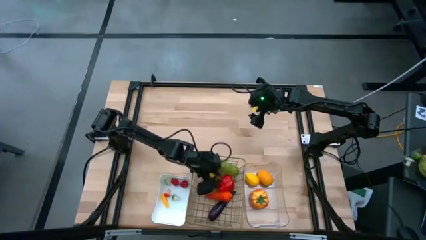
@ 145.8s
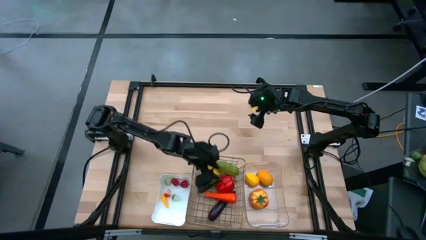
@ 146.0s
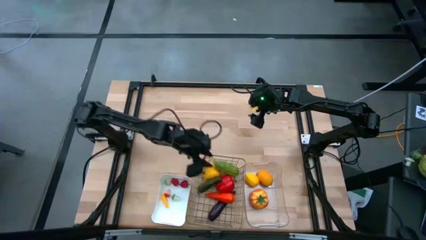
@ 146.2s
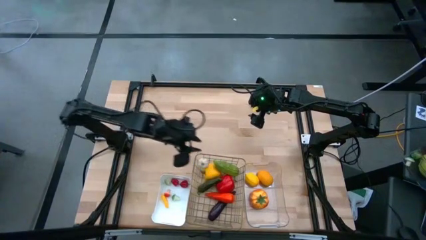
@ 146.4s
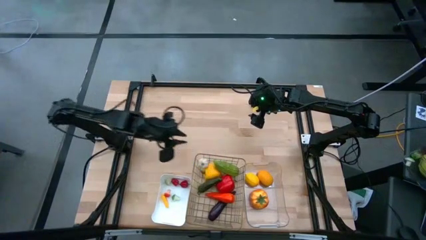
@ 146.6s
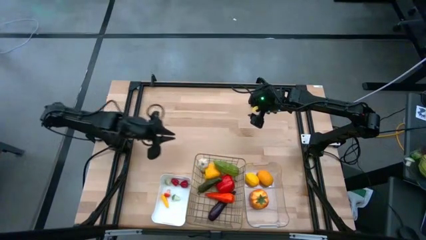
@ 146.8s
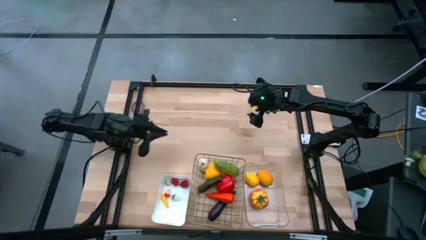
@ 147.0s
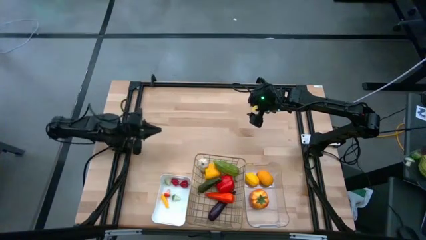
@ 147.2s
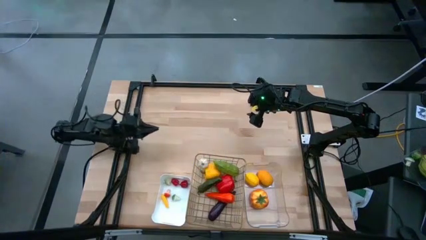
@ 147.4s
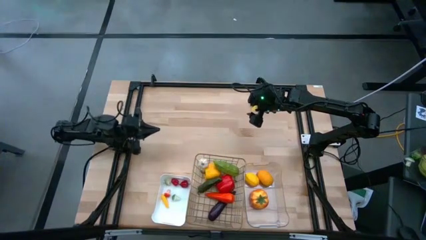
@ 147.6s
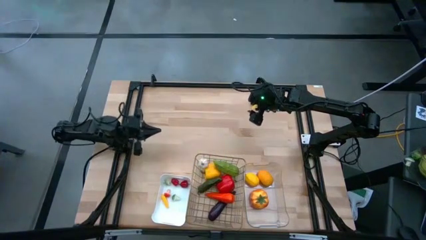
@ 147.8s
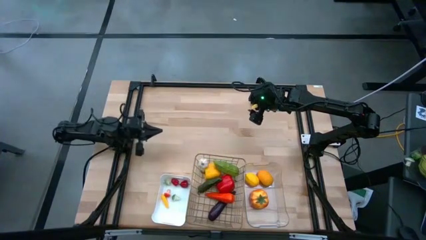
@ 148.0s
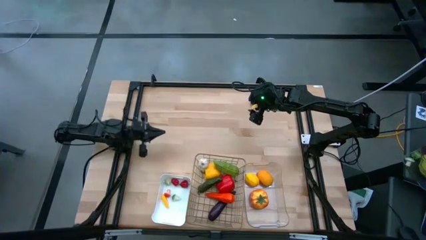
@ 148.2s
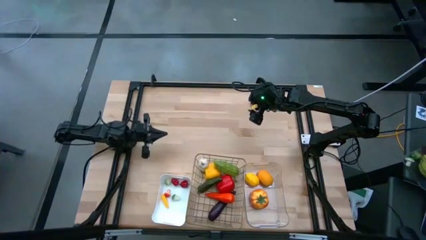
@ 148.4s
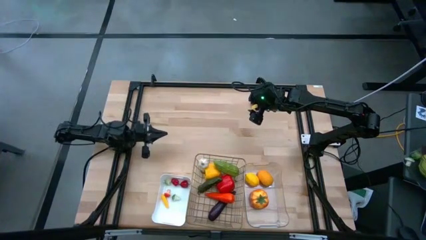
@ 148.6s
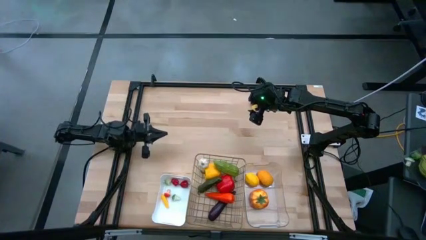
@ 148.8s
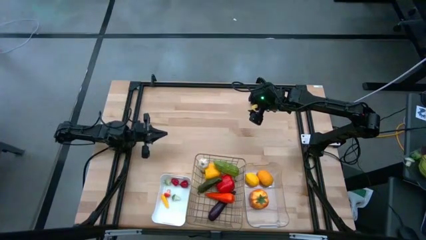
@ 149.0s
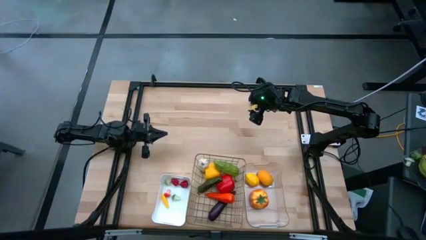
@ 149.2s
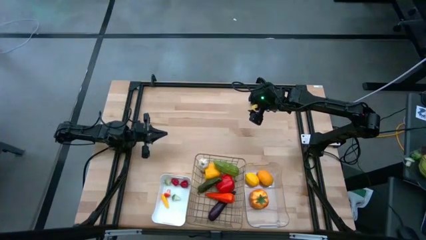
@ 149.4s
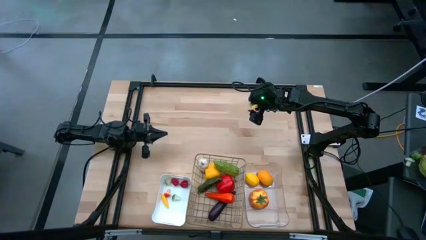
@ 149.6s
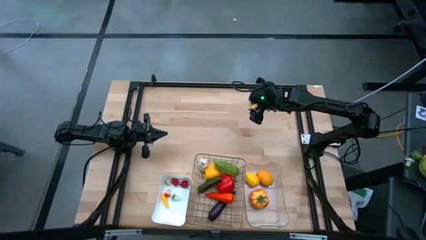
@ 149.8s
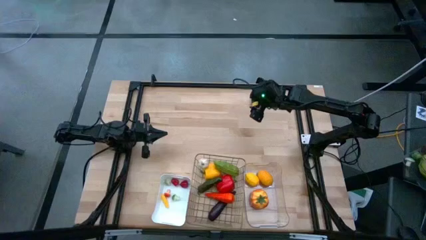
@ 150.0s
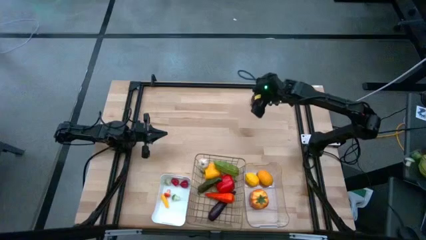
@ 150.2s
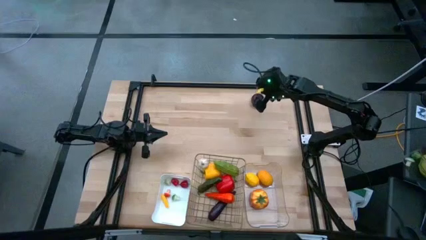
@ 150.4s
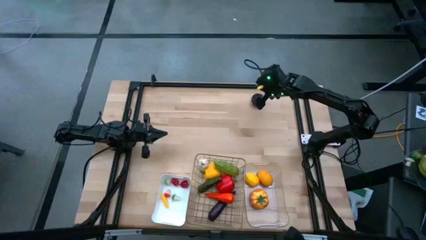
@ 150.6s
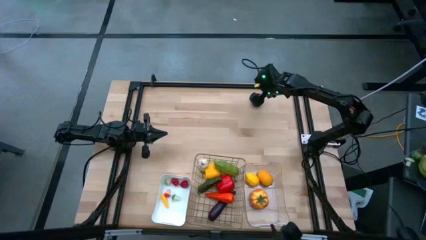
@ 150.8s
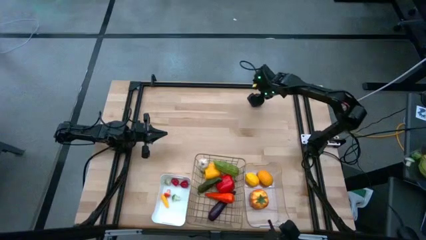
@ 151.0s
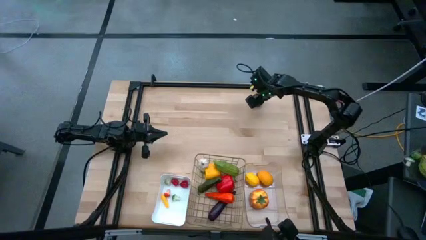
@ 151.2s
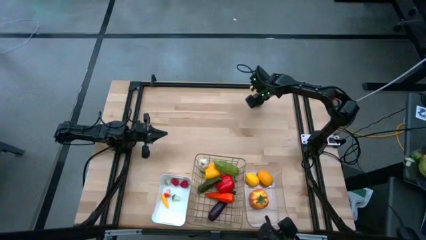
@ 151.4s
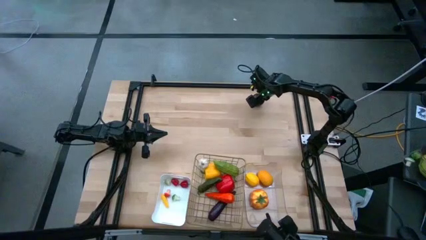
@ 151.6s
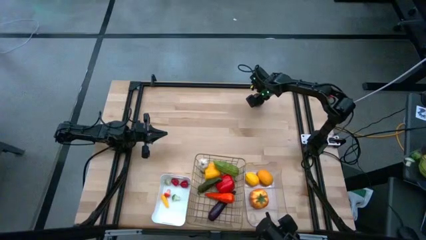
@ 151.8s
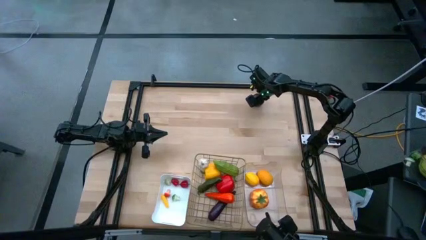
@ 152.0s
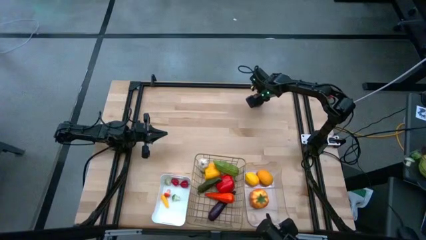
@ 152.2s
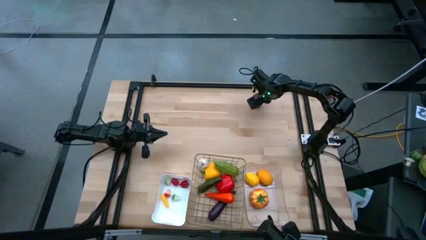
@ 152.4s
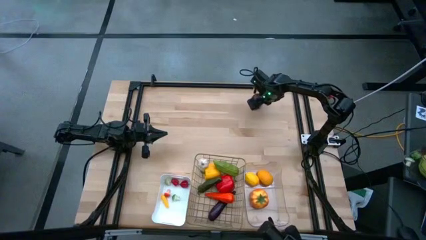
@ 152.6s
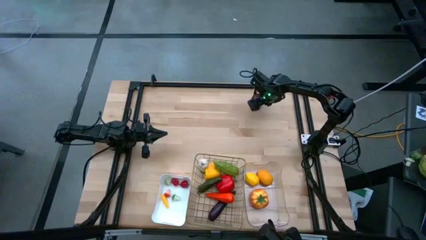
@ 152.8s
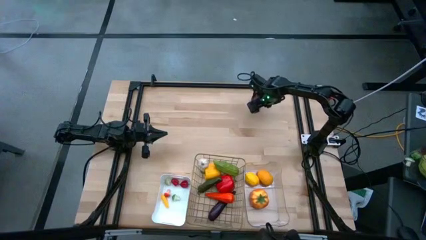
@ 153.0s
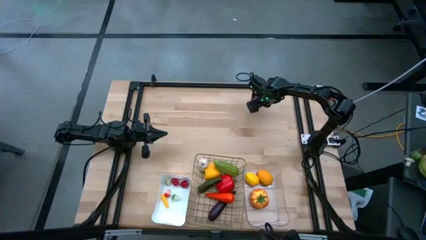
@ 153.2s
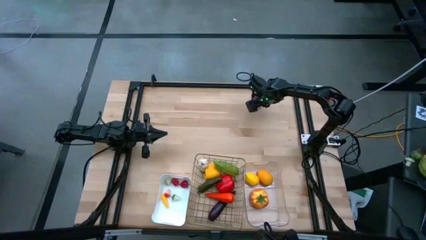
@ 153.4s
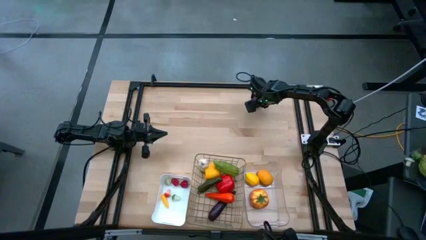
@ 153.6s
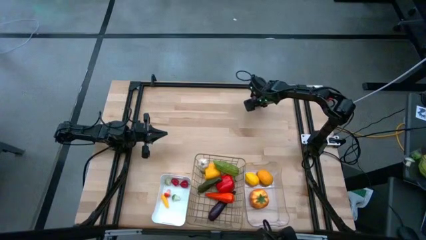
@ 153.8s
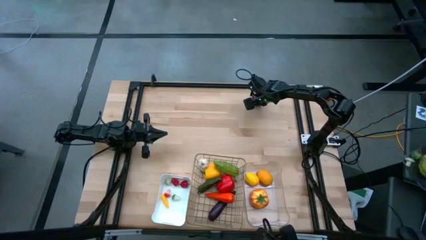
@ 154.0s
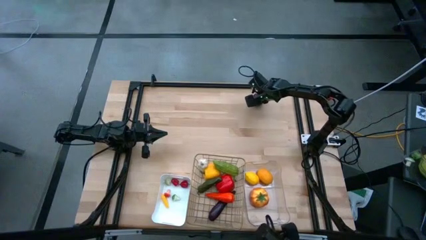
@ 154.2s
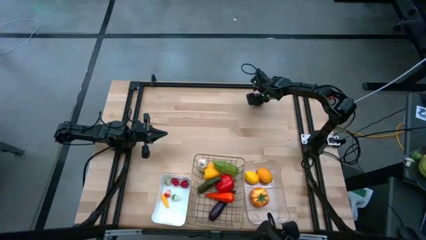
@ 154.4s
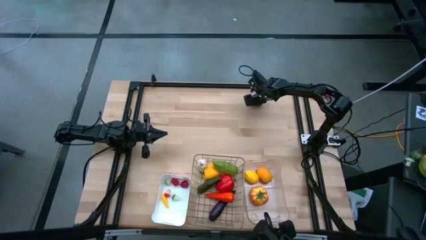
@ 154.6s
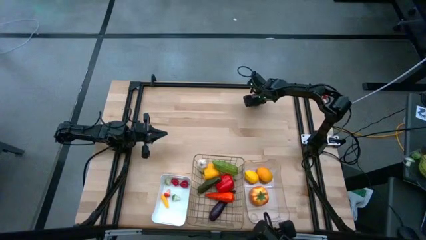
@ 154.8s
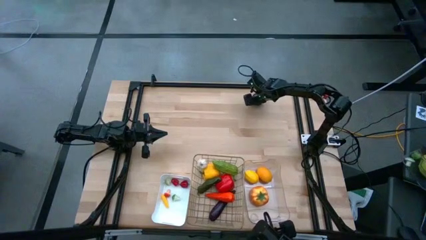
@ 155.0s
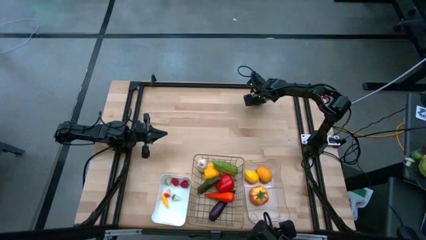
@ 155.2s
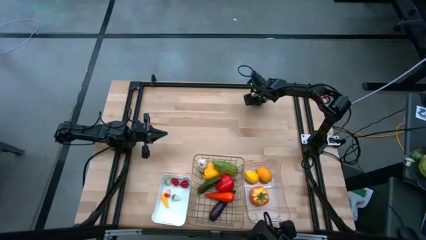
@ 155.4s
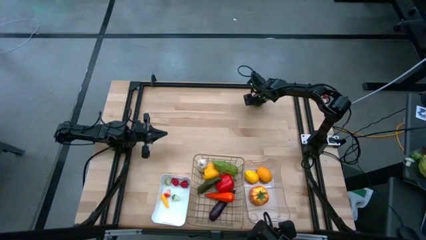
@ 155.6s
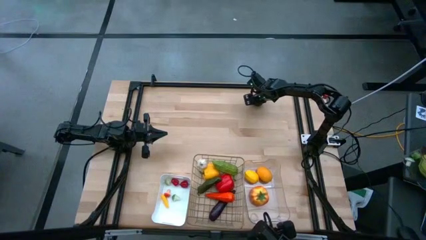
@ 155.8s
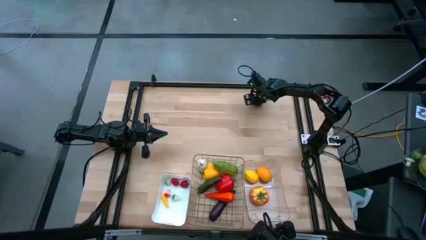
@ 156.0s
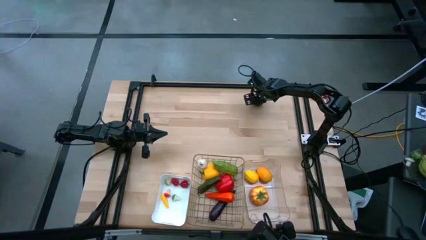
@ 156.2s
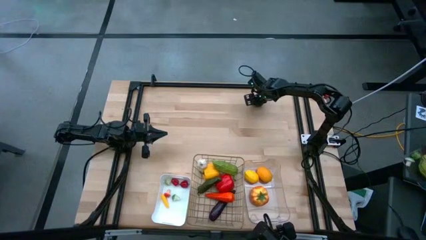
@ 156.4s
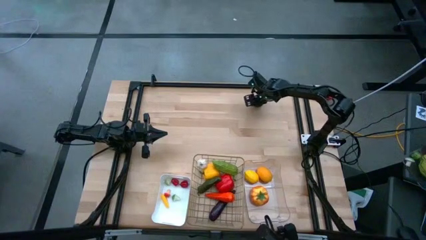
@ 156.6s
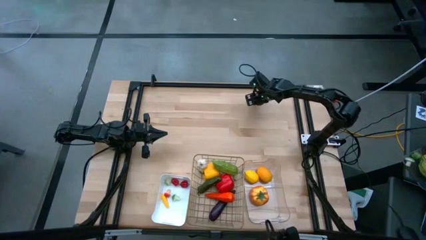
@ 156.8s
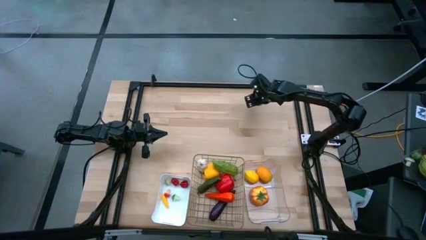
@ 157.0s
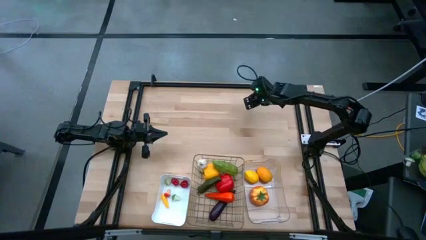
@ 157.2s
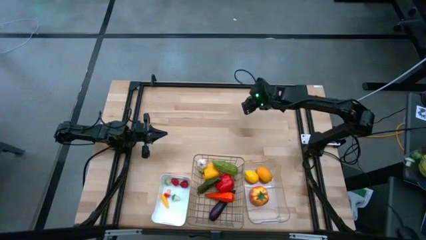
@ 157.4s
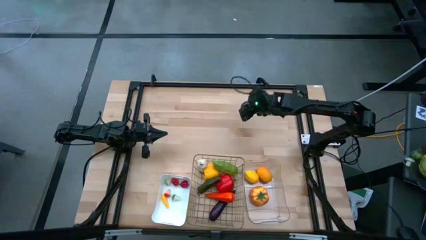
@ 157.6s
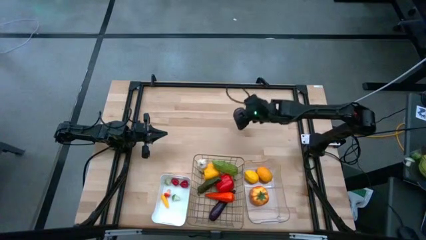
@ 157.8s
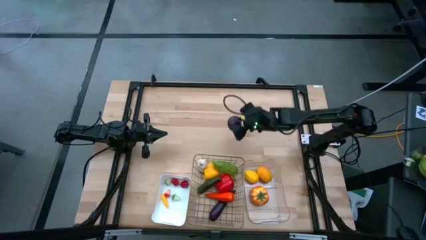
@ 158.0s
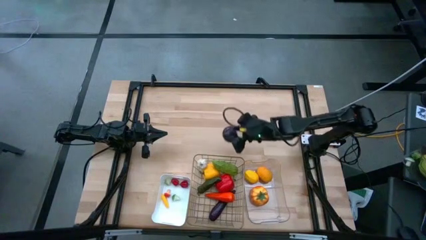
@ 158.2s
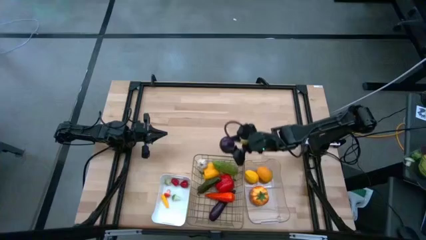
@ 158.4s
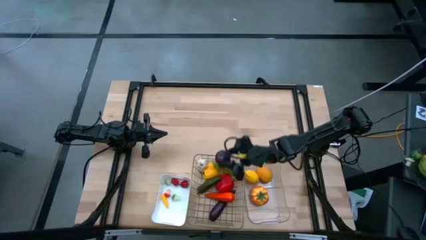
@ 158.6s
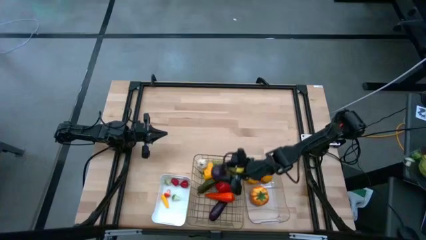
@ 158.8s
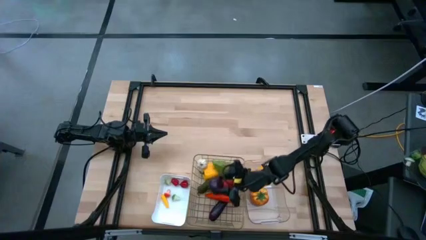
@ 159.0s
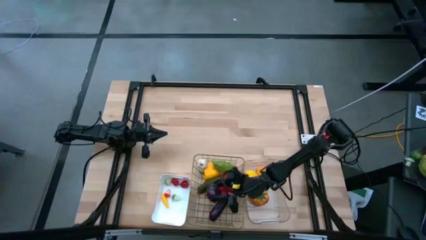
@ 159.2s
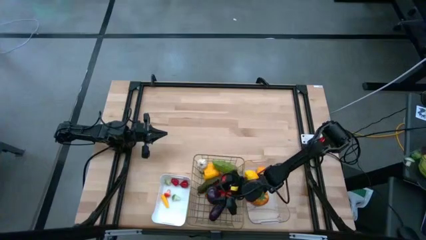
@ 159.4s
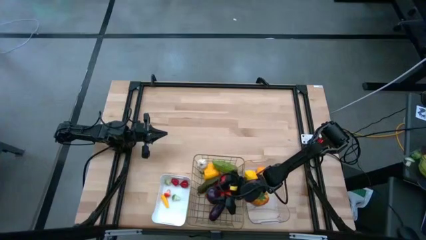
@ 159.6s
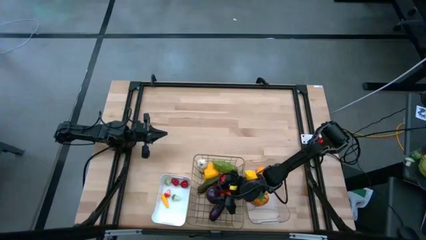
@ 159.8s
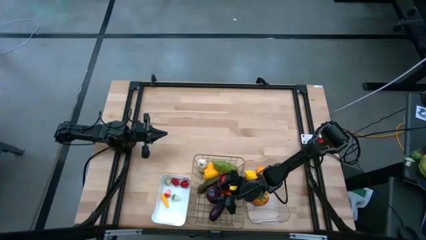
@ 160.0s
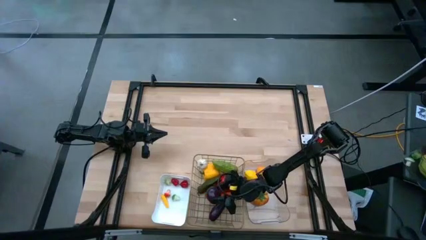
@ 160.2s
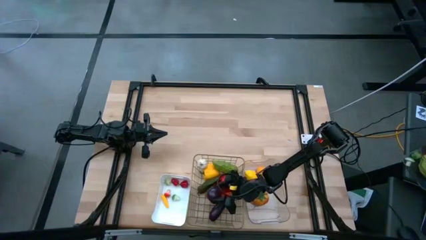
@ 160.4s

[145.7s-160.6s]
Task: Sort produce into baskets
Put the plum into the wire basket
